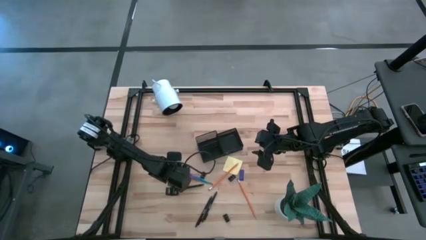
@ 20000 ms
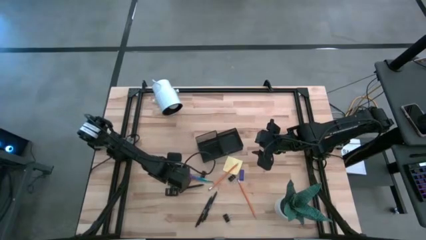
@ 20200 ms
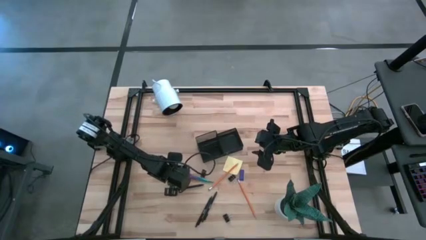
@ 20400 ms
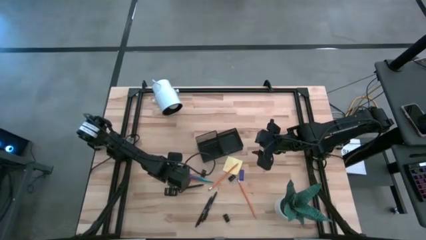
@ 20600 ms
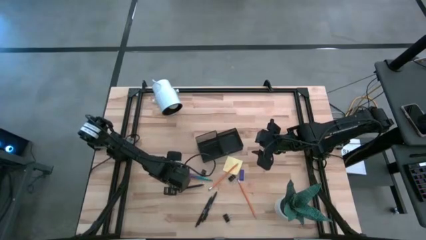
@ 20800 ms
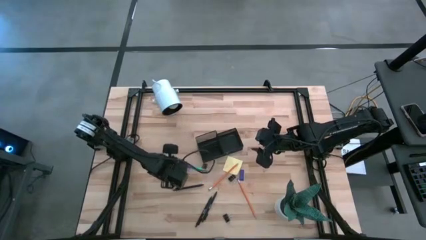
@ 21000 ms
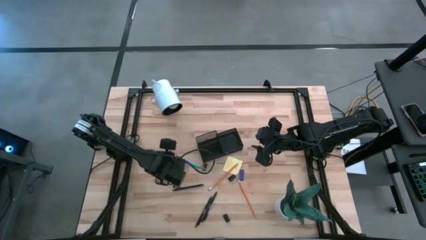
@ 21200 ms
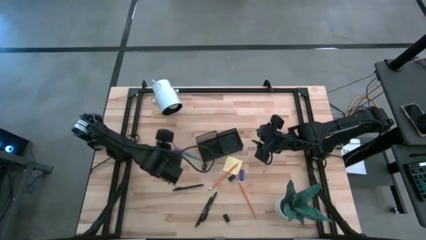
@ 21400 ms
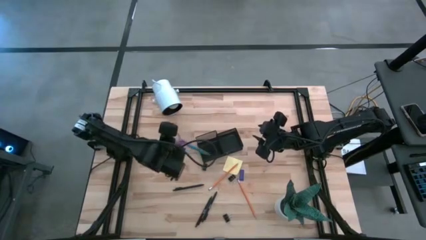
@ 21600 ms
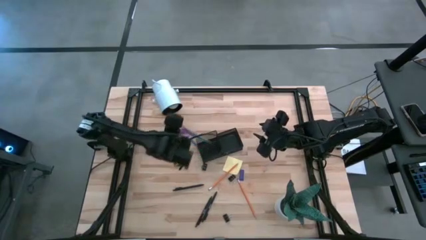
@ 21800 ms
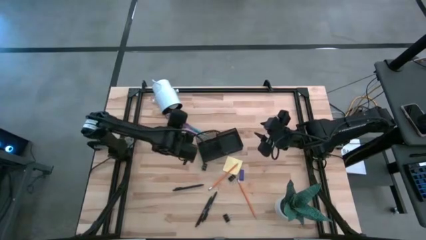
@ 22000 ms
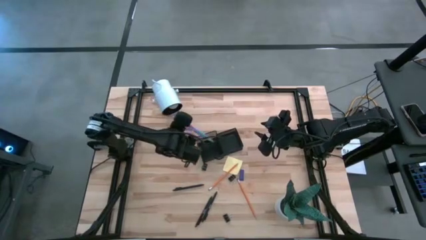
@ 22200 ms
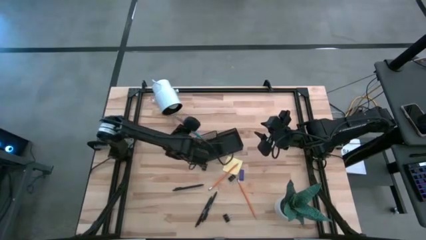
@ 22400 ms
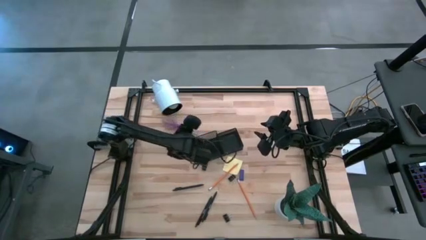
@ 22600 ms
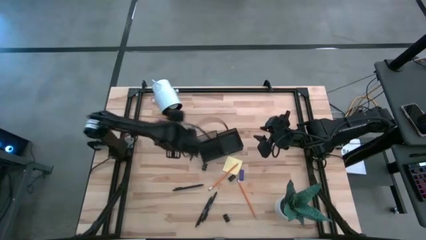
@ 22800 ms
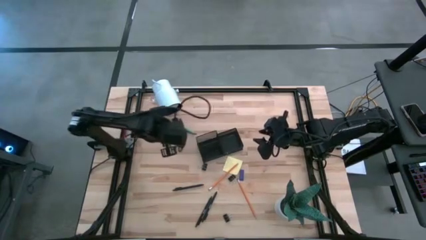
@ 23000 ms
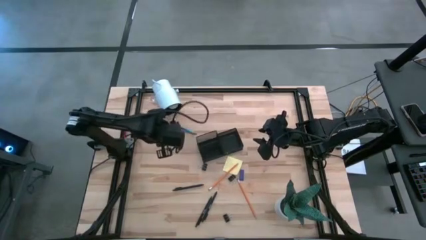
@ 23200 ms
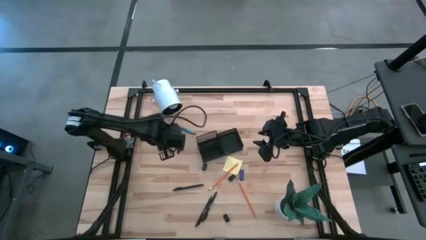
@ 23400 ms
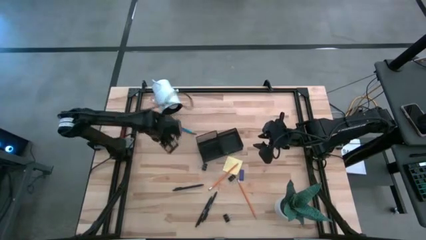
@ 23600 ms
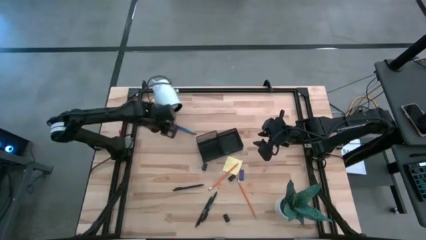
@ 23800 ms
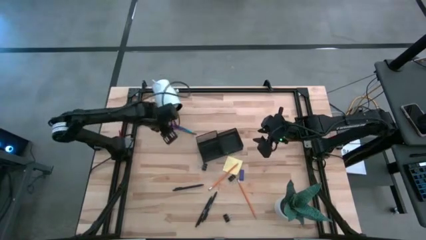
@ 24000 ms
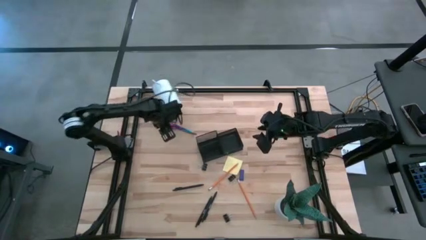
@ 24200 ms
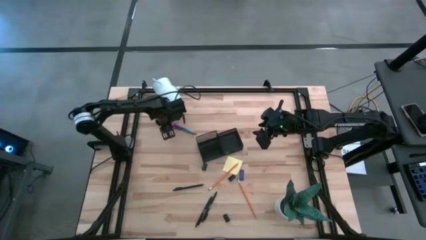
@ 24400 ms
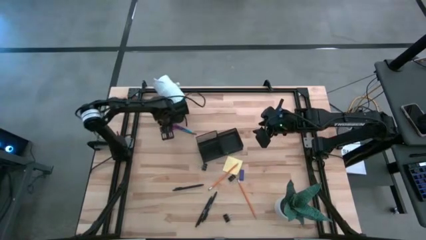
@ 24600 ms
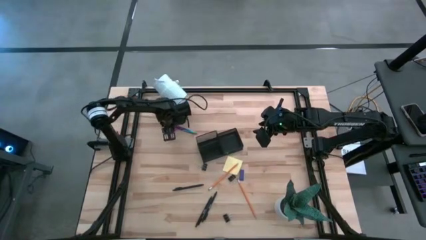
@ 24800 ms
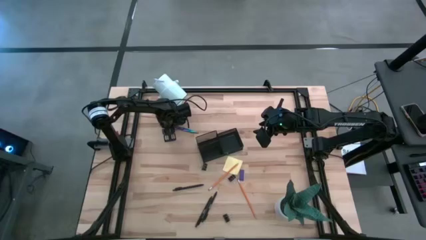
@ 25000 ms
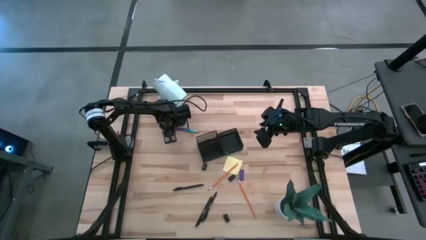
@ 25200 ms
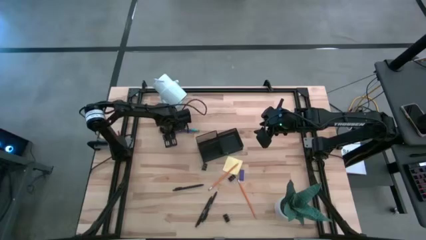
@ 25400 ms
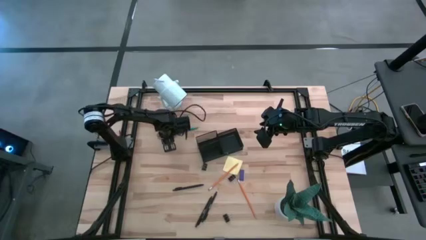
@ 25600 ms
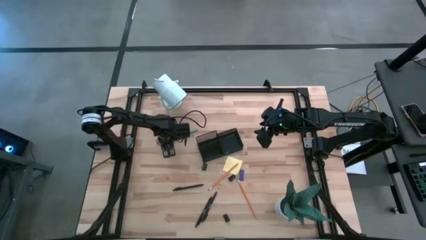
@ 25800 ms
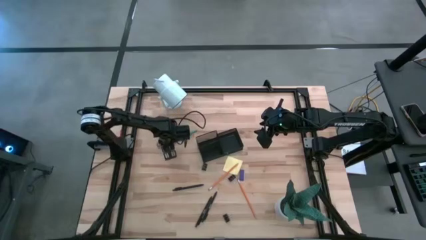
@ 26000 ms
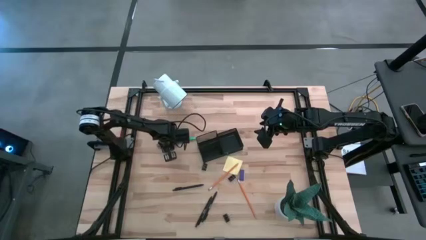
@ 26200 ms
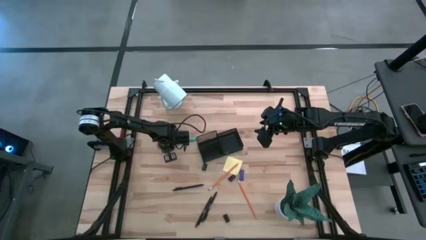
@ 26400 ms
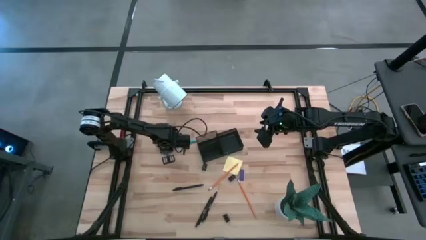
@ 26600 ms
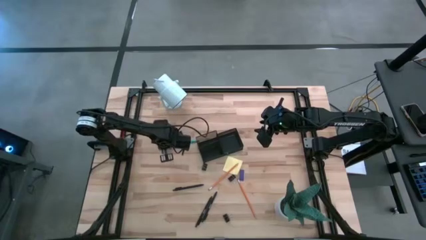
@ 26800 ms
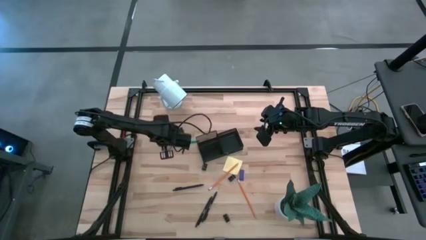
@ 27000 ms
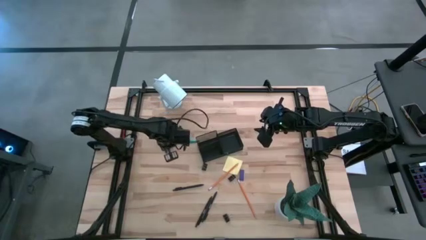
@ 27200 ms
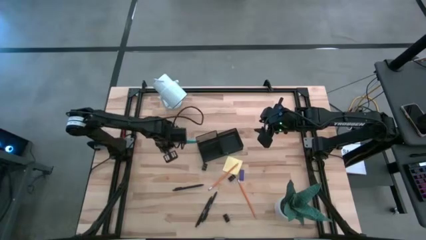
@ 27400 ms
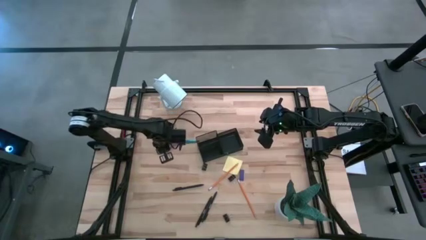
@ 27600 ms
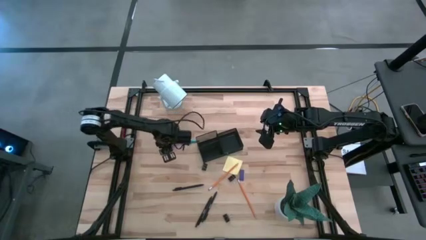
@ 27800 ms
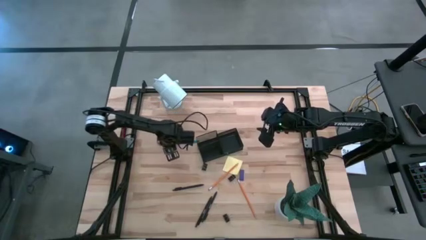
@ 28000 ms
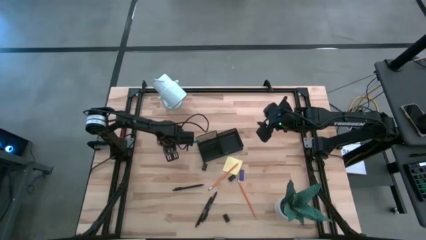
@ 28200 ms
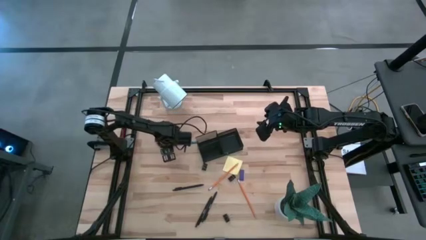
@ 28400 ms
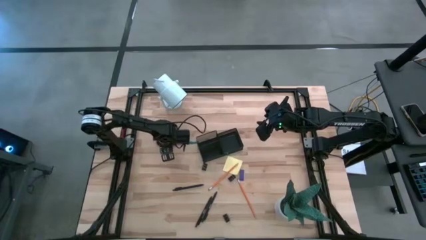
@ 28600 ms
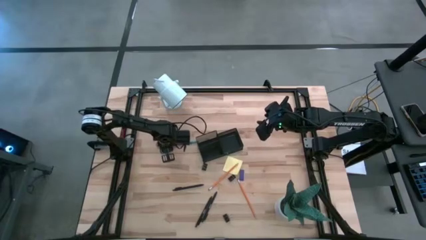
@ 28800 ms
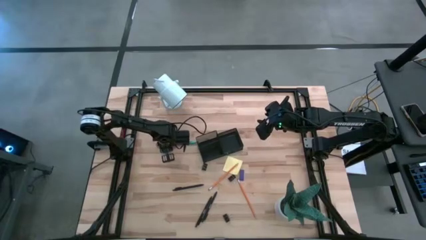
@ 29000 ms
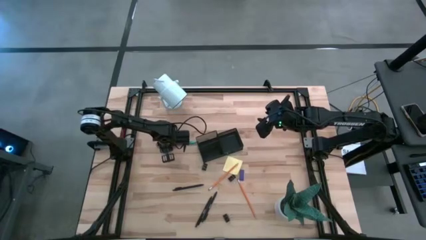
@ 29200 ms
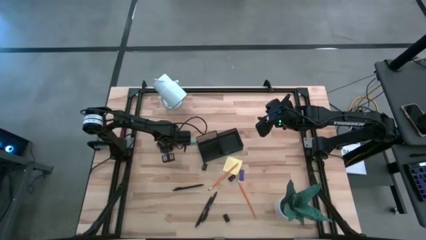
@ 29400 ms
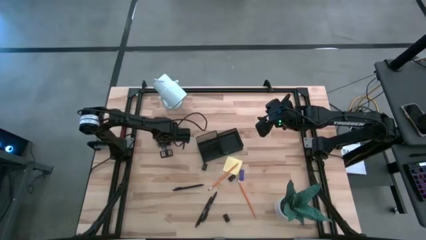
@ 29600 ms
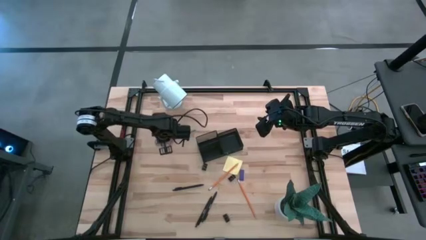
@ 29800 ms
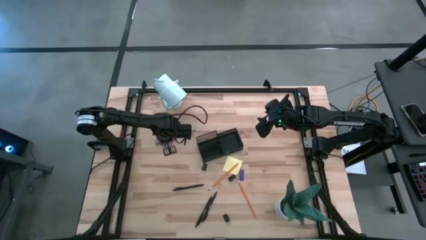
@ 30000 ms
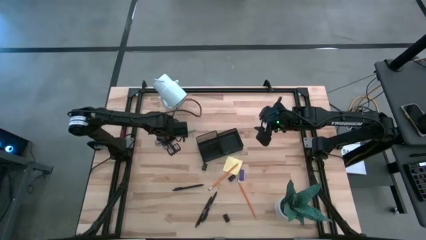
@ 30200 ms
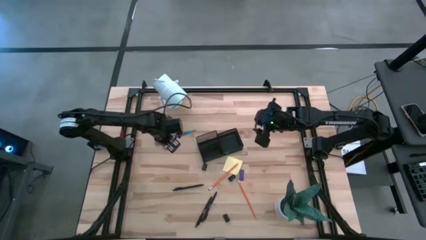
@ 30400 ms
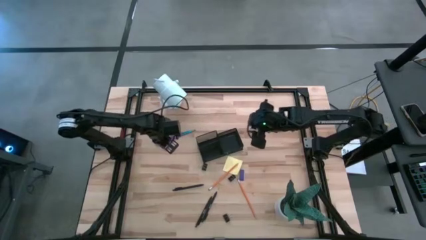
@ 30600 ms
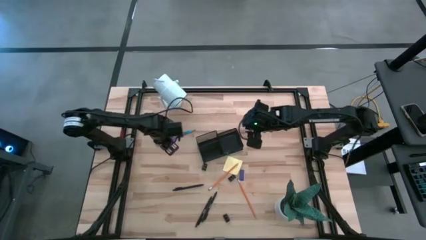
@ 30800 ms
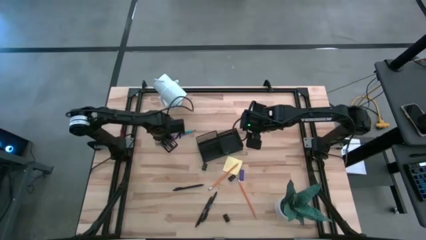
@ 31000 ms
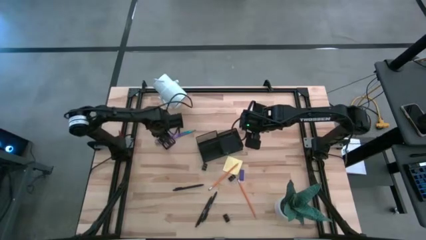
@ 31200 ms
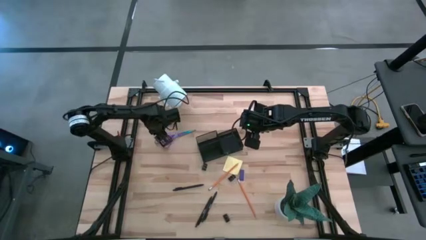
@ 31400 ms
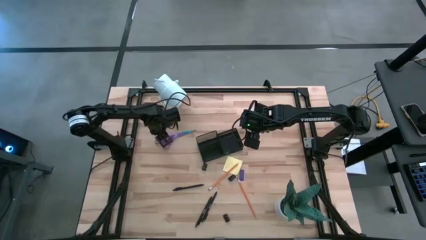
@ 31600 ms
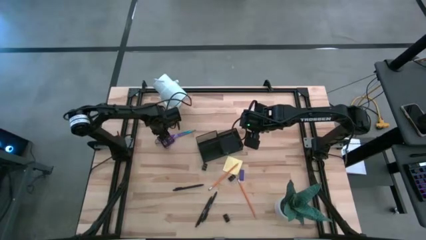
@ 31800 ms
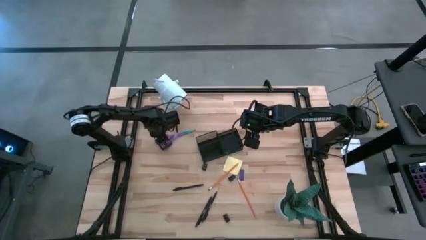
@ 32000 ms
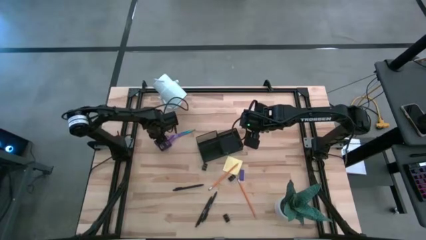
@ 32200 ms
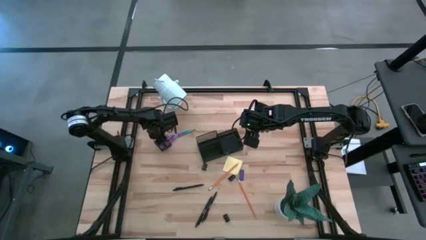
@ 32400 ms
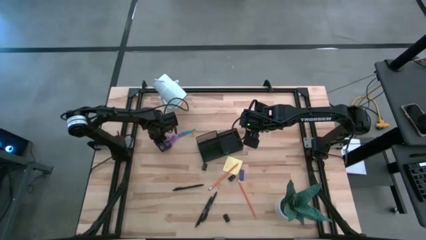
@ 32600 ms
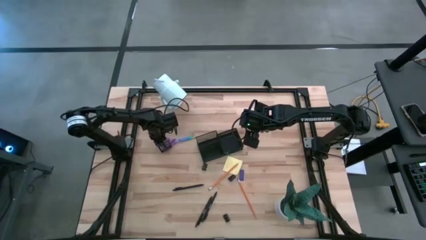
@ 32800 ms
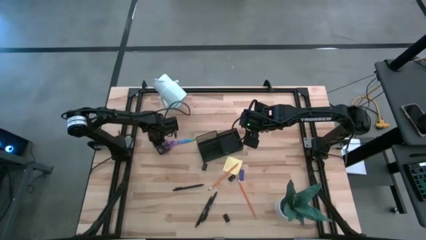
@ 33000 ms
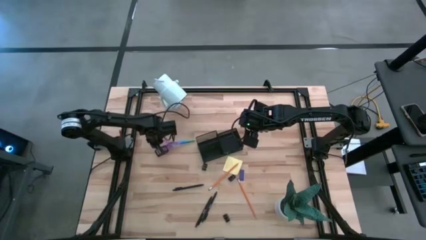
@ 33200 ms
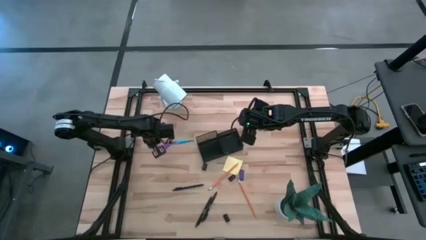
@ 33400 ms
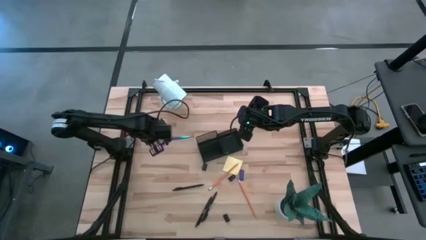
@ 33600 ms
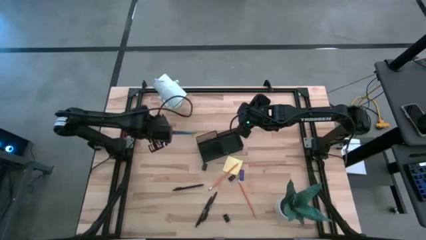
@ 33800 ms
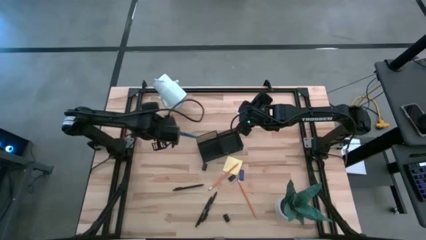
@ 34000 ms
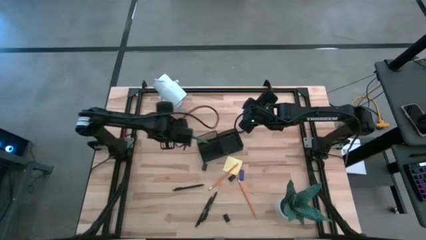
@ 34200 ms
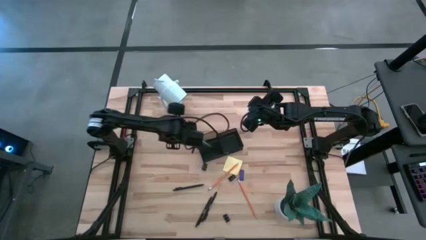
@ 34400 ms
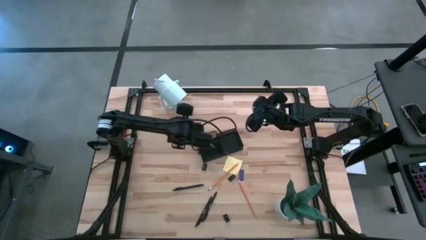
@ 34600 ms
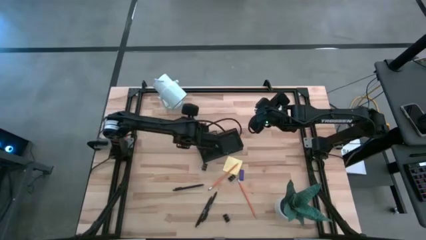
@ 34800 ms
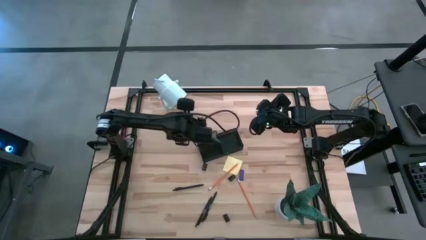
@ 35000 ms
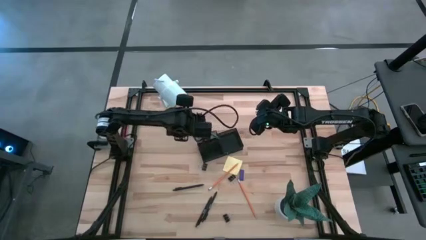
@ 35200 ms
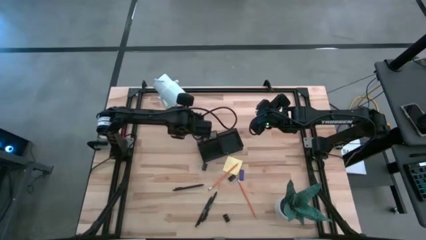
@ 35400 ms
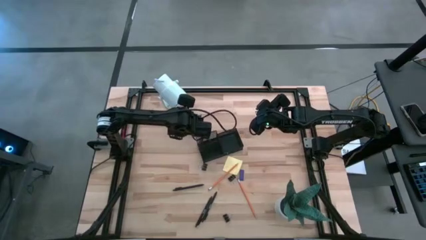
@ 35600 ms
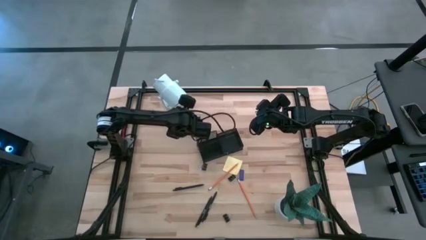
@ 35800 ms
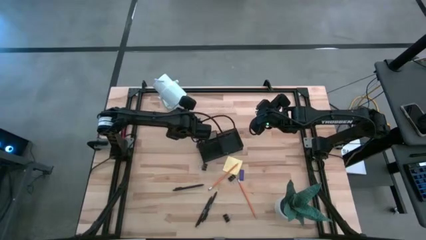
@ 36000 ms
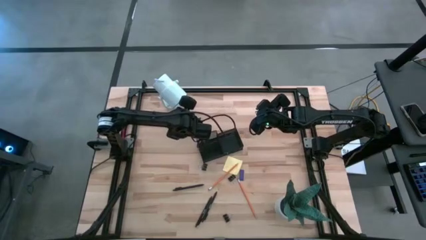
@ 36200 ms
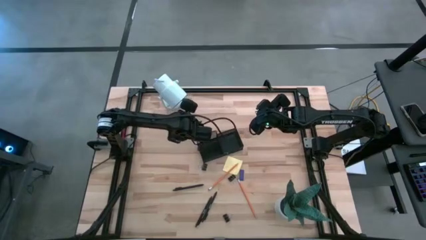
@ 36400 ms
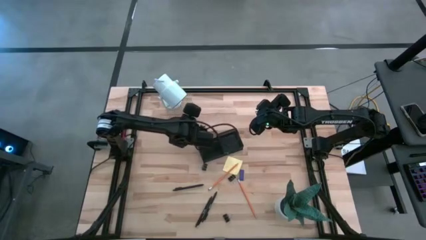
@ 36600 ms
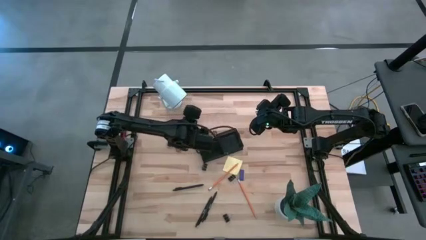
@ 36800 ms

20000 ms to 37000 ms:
Task: Pick and place office supplies into organizer
Put the purple scissors into the black desk organizer
